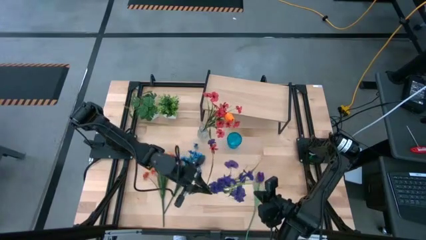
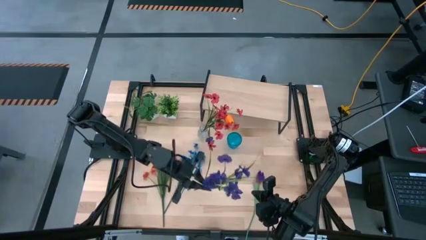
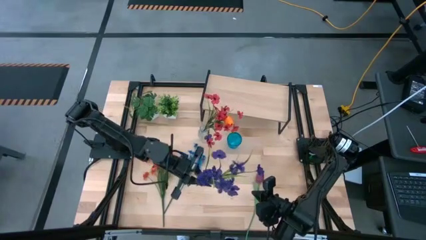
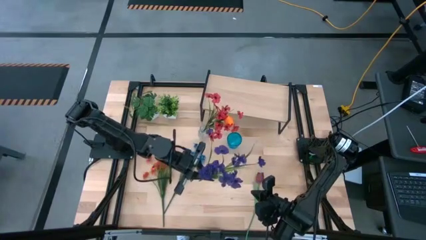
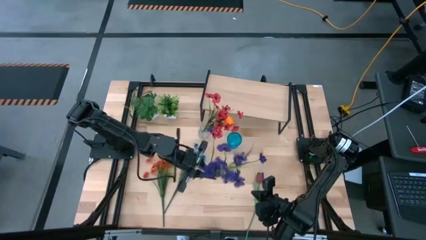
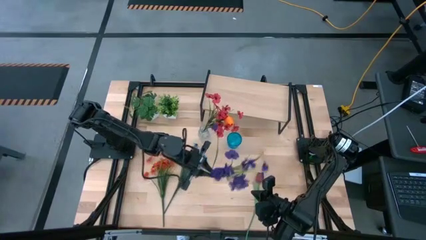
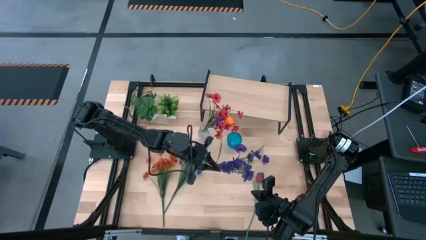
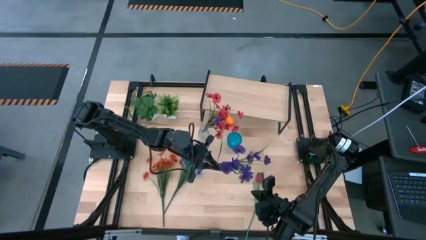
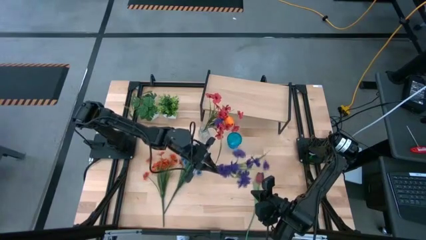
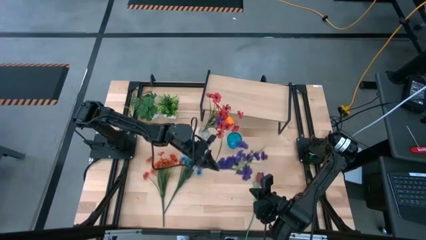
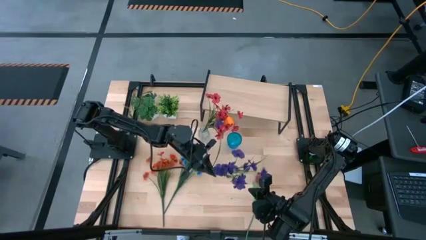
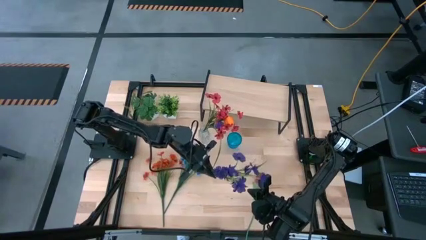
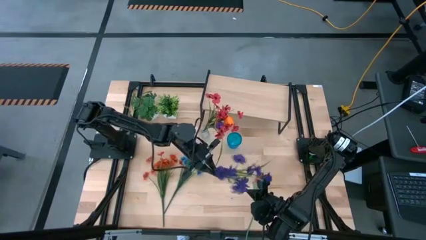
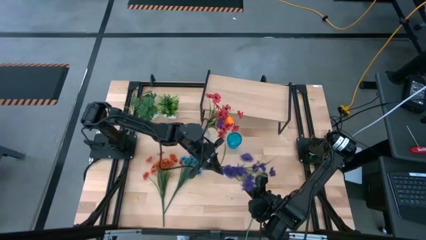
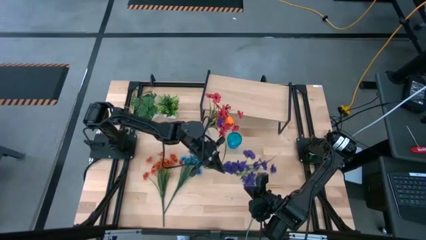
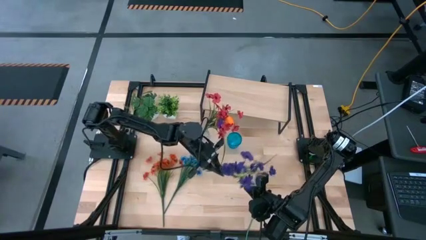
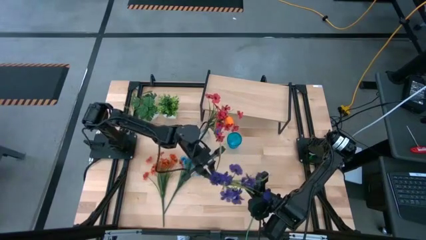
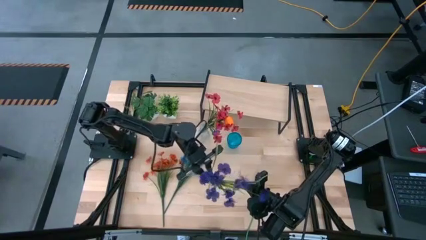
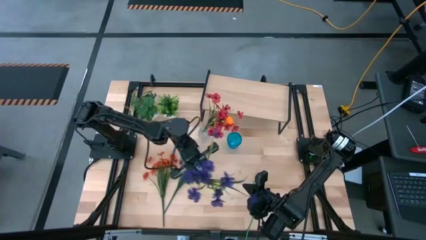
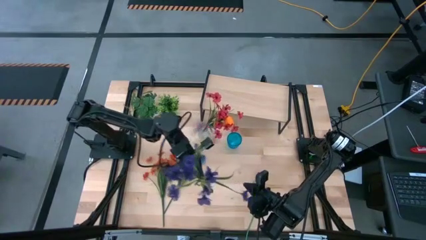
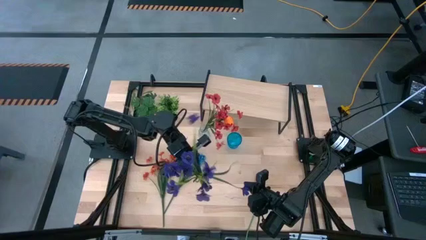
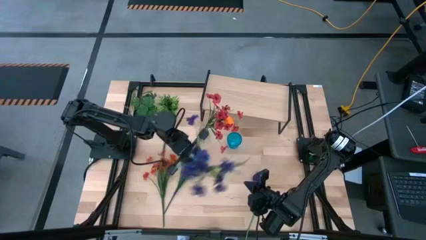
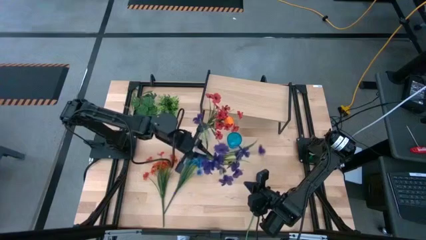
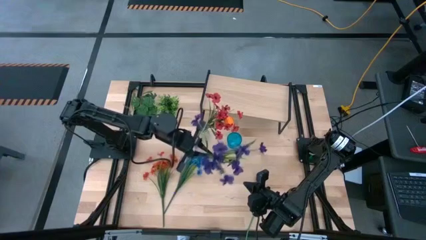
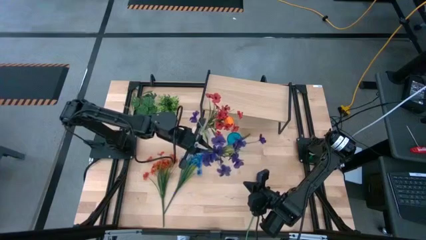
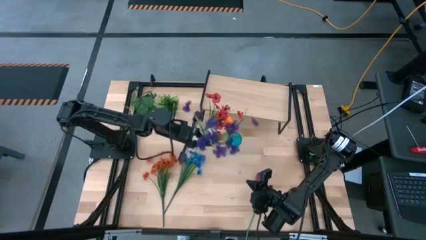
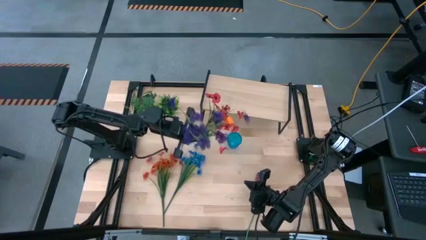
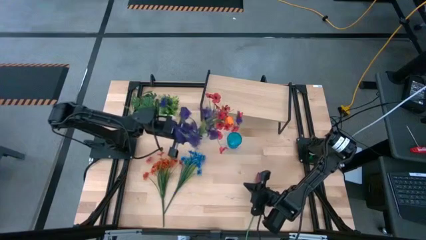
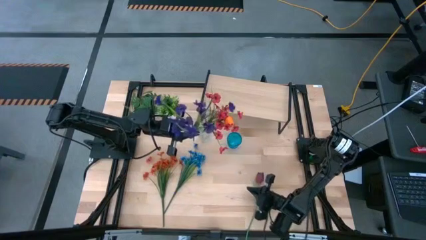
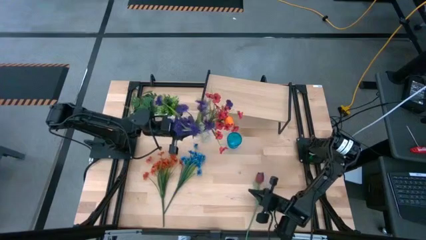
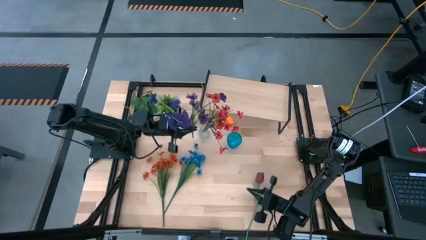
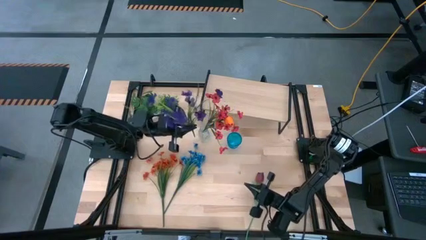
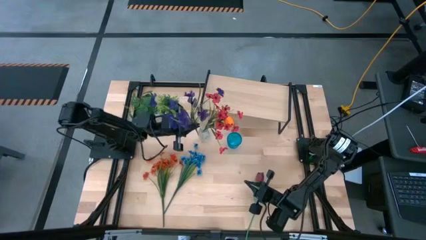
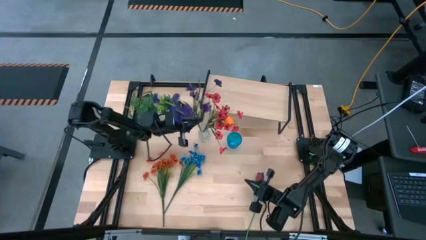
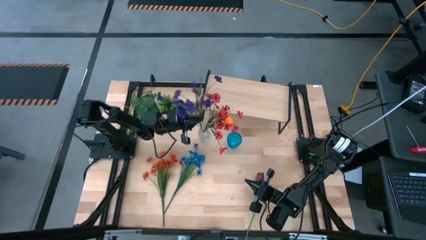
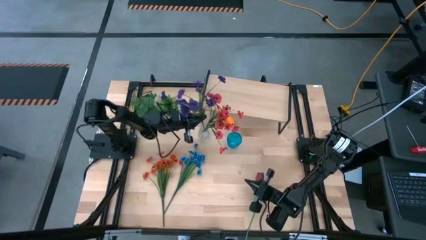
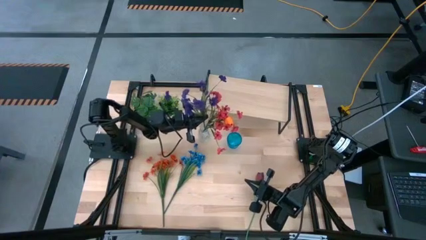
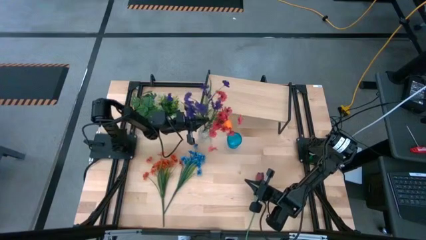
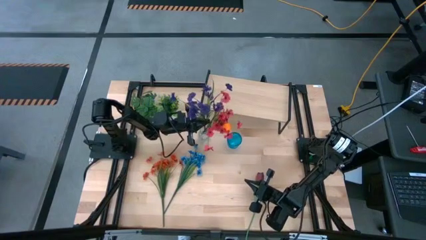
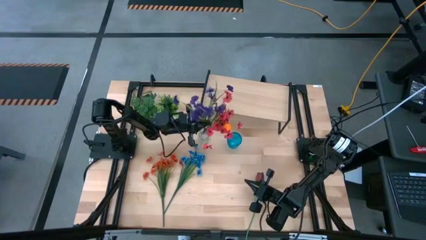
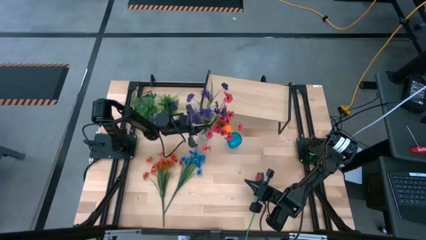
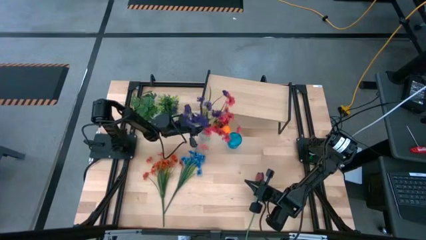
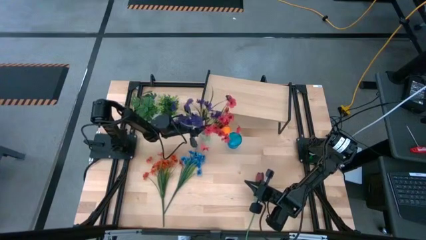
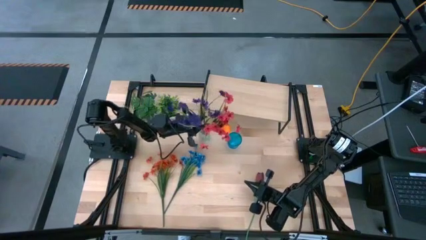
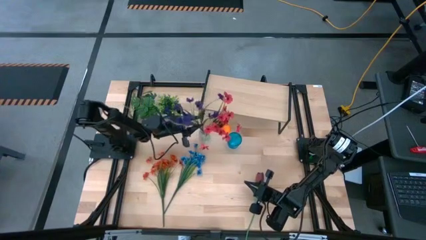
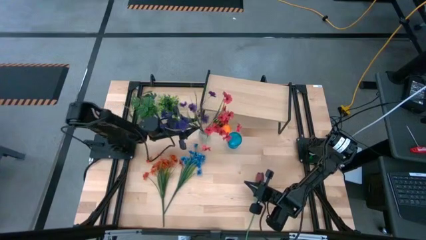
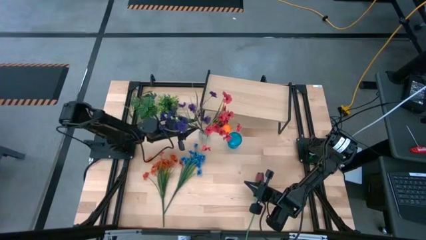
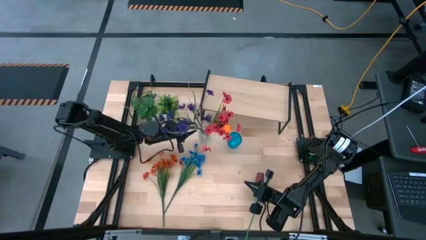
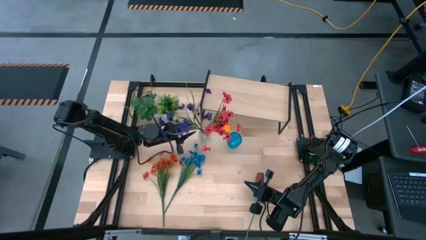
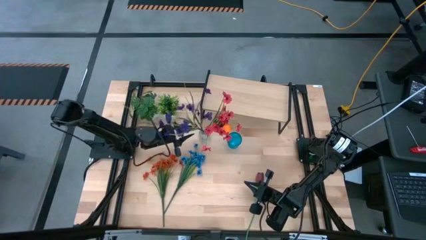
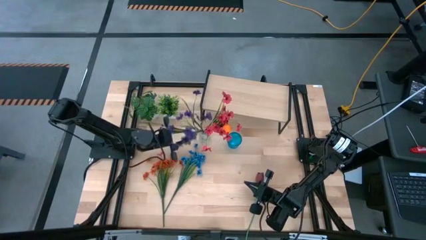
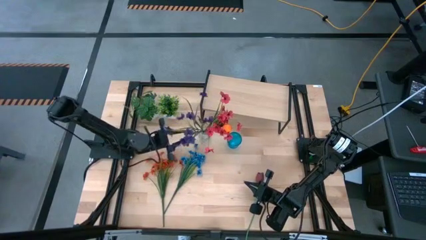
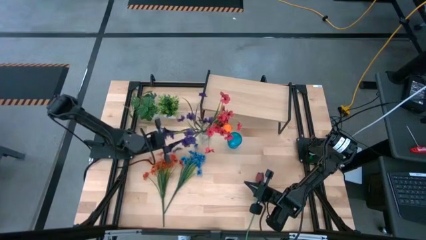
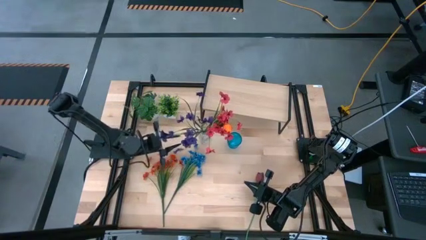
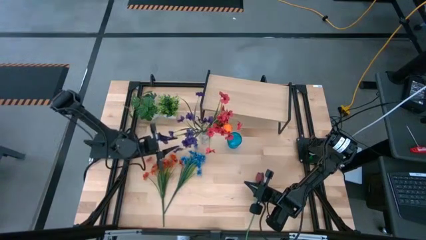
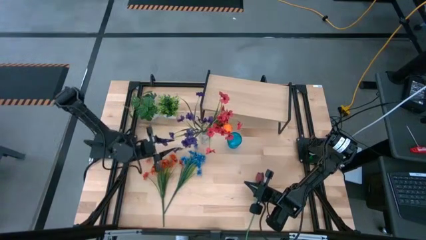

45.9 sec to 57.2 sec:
Task: Pick and place flowers into a vace then onto a shelf
Put the purple flowers into the transparent vase
